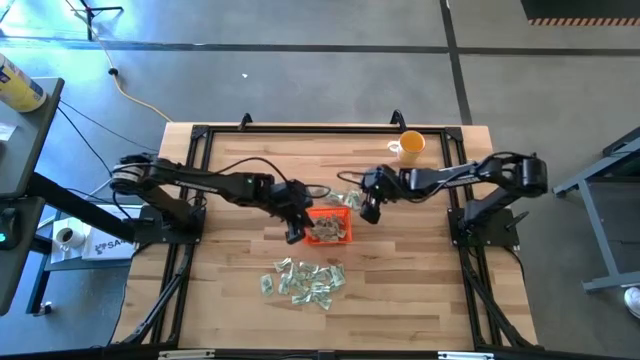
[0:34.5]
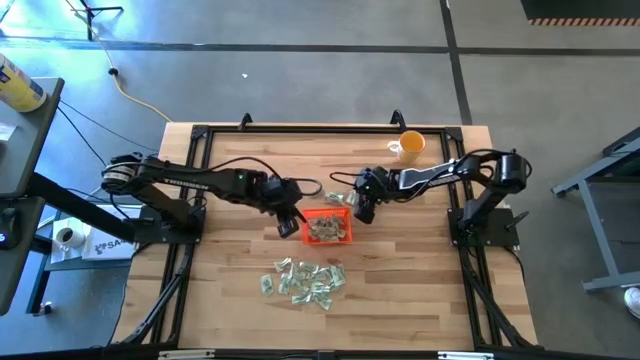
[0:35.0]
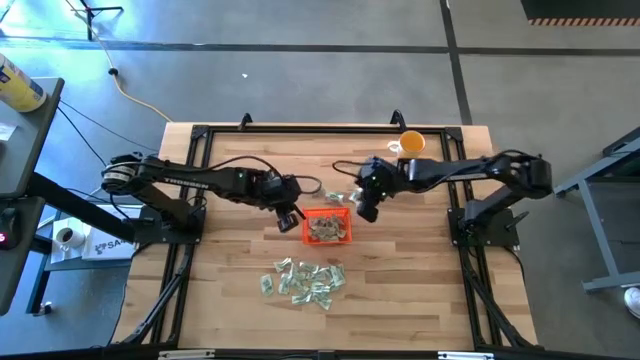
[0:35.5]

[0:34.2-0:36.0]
Task: Pick and place Stevia / Truvia into bins
Put the stevia packet into the orange bin

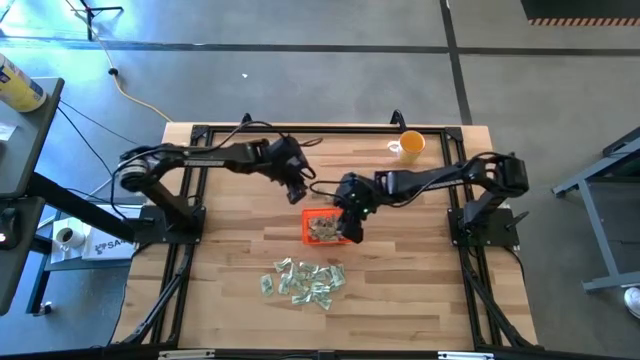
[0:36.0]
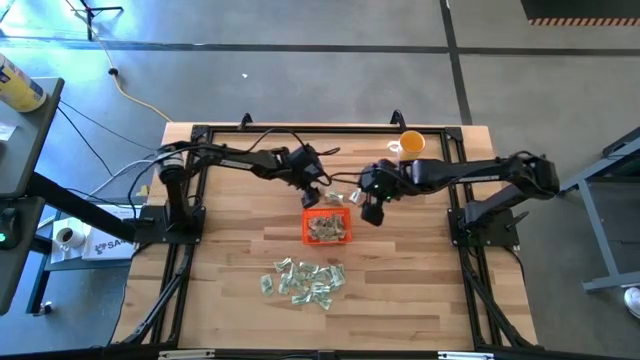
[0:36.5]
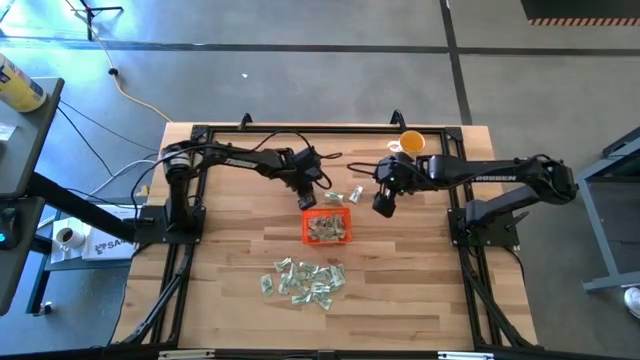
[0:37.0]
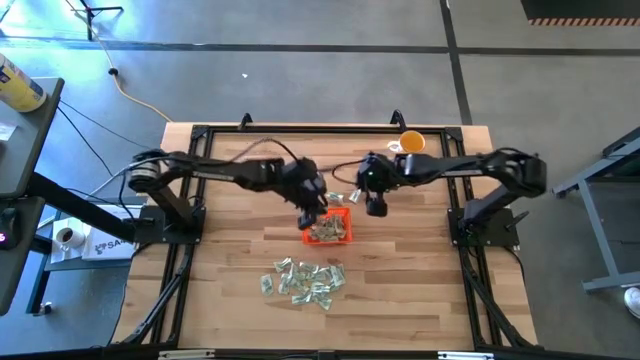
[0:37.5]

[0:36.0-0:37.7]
Put the stevia packet into the orange bin

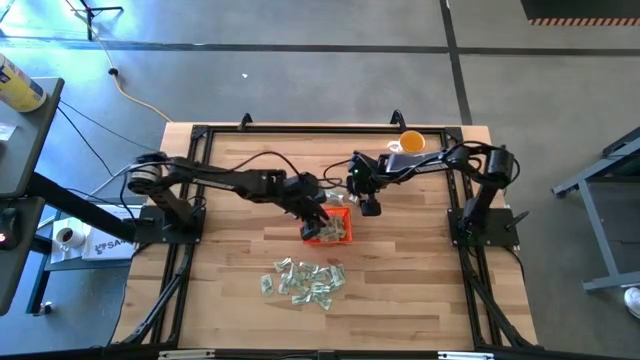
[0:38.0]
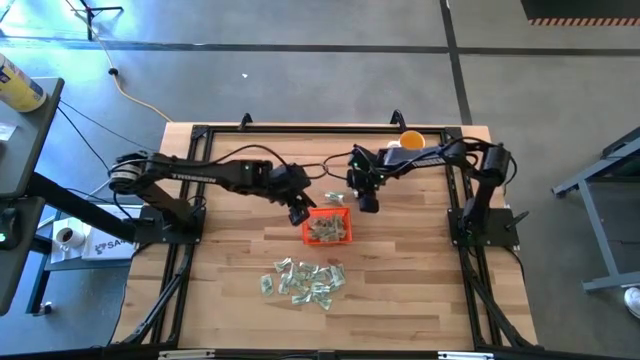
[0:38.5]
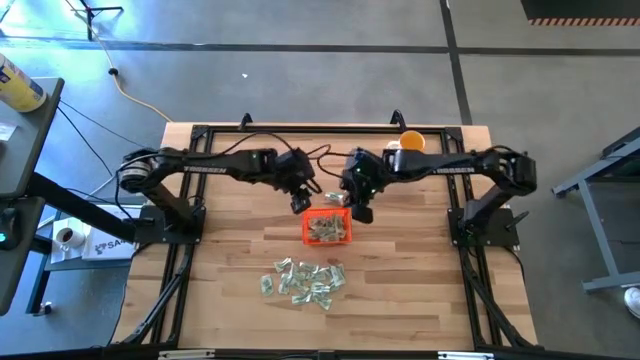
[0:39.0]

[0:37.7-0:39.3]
Put the stevia packet into the orange bin

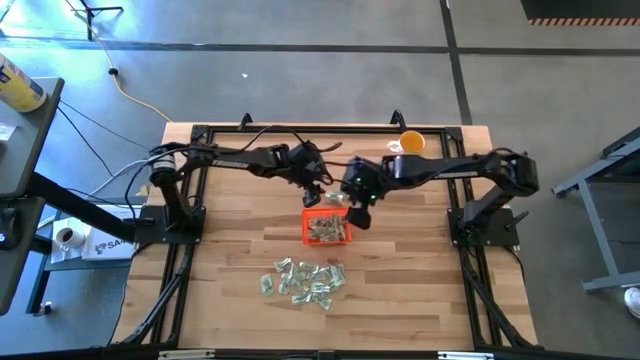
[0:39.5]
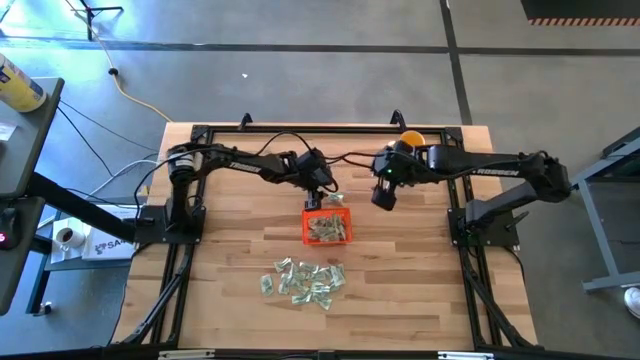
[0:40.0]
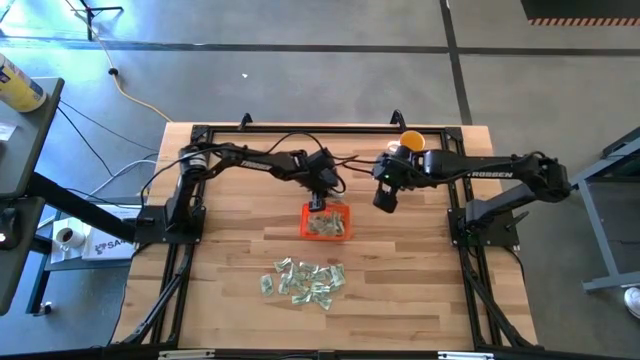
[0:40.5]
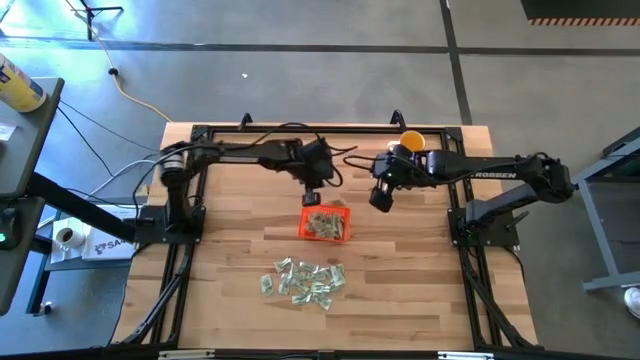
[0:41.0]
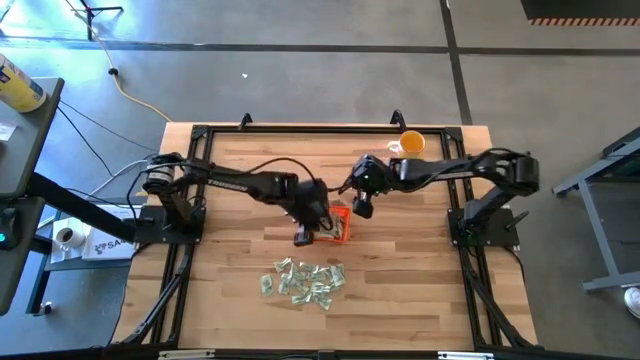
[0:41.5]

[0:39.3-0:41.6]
Put the stevia packet into the orange bin

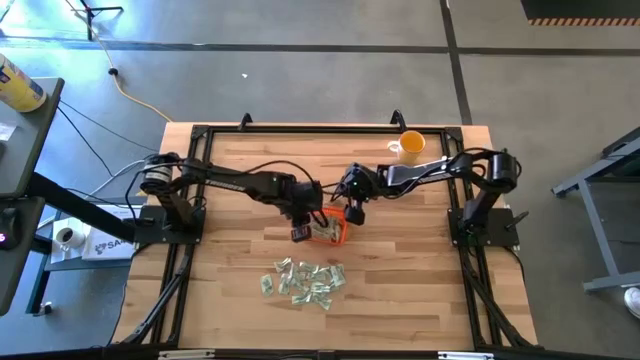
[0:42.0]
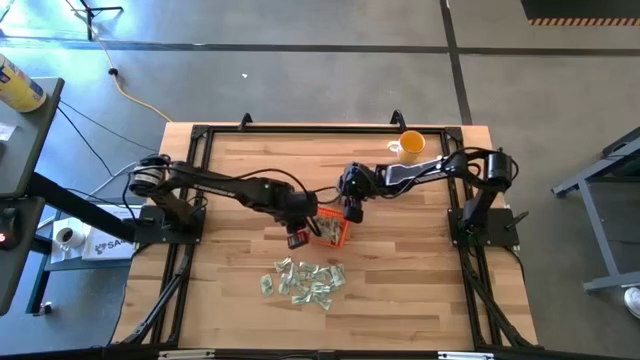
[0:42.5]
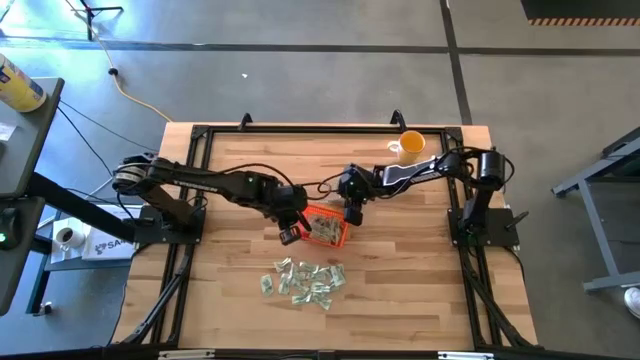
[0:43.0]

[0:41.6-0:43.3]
Put the stevia packet into the orange bin

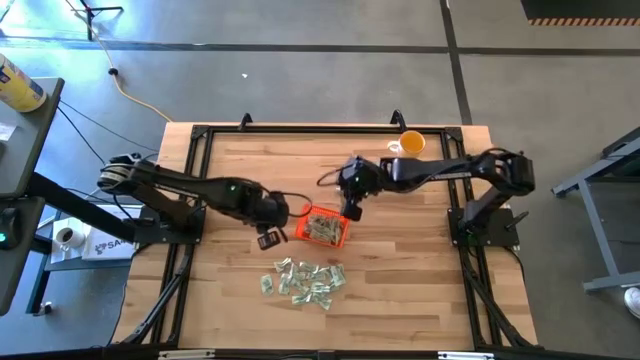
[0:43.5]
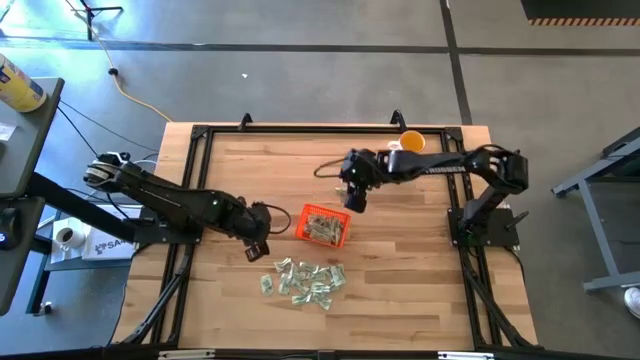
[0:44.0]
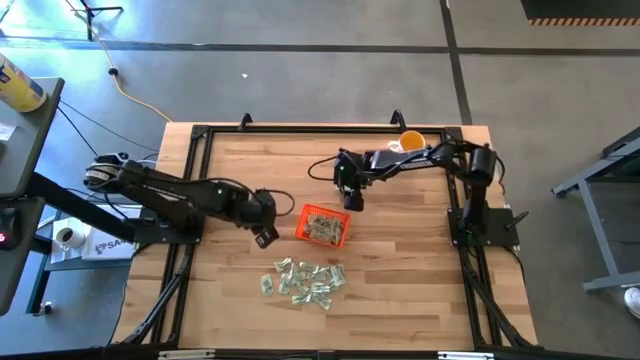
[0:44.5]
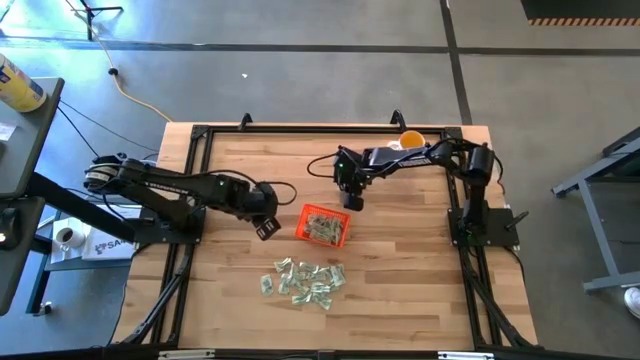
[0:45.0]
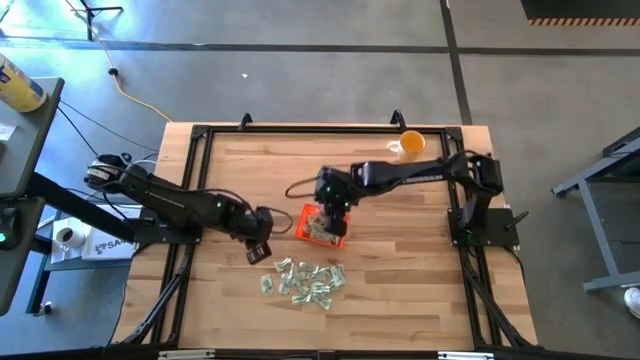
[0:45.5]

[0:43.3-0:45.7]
Put the stevia packet into the orange bin

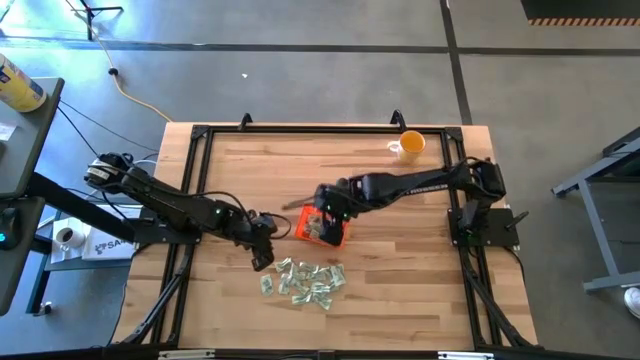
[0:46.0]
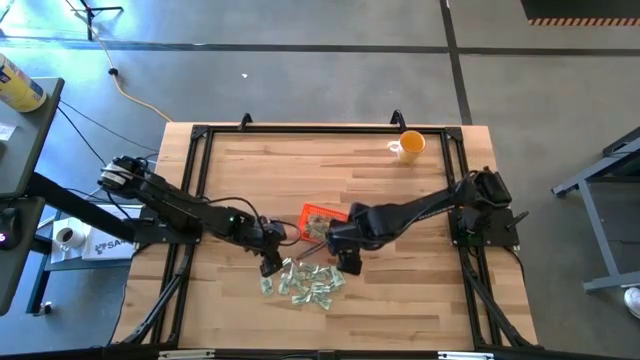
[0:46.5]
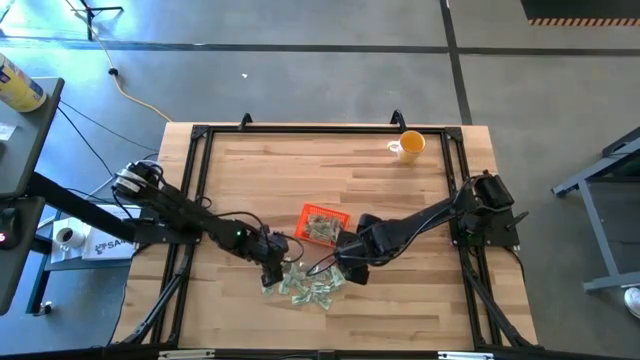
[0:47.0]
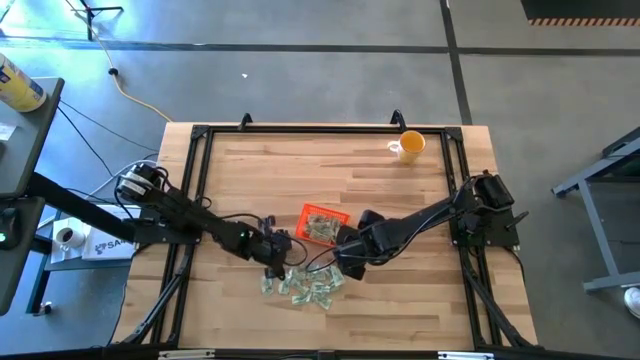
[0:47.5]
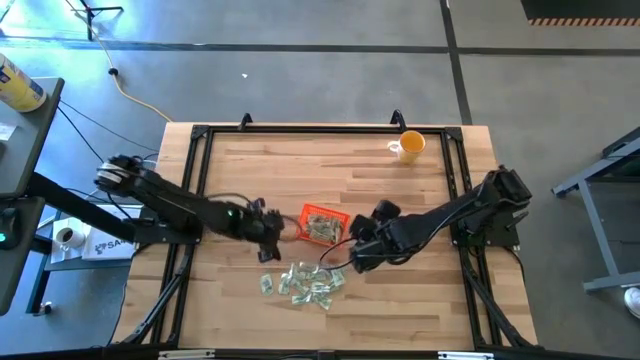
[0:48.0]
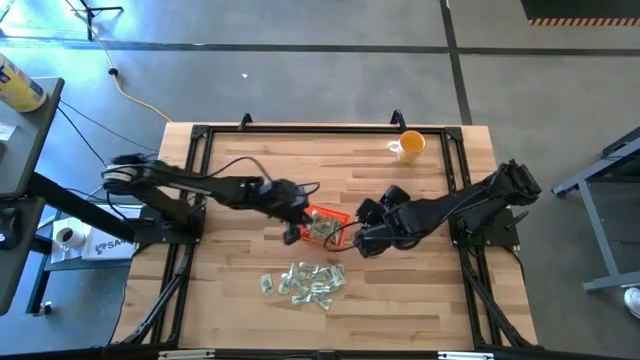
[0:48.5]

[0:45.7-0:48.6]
Put the stevia packet into the orange bin

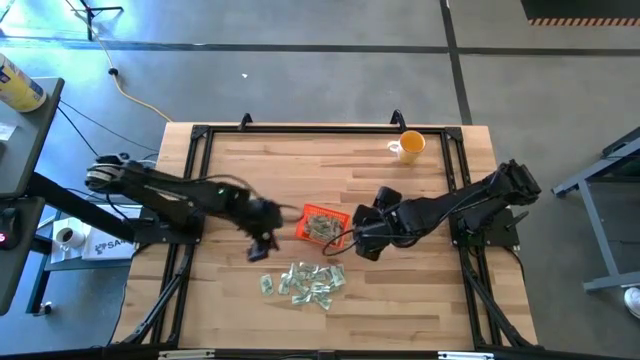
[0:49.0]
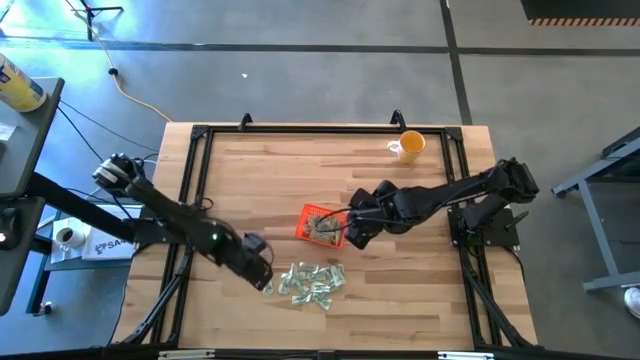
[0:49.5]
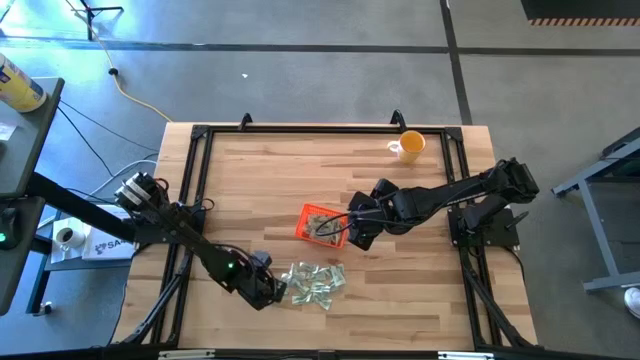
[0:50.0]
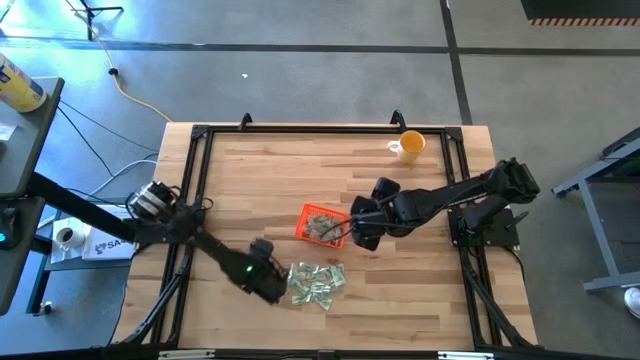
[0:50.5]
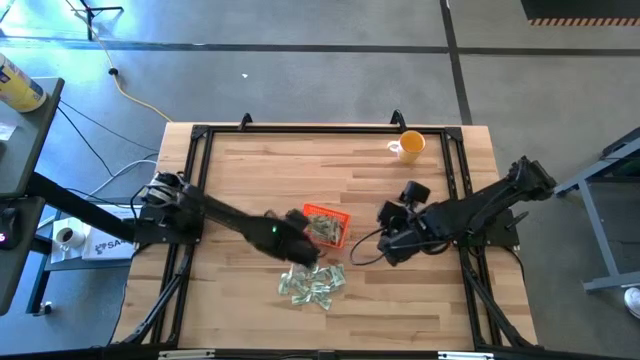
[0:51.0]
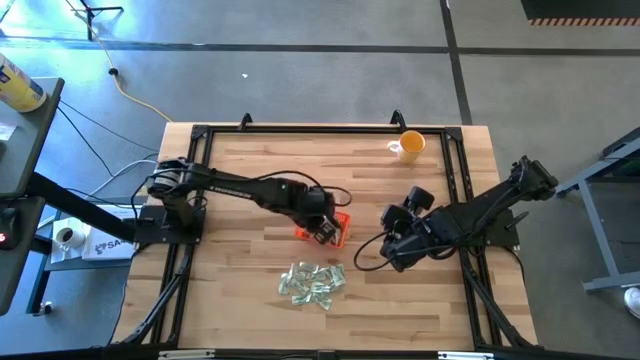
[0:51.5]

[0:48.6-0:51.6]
Put the stevia packet into the orange bin

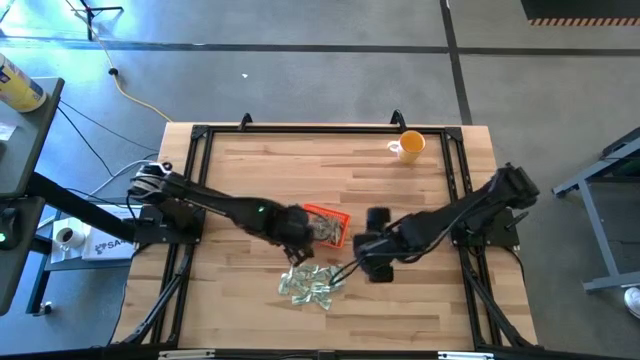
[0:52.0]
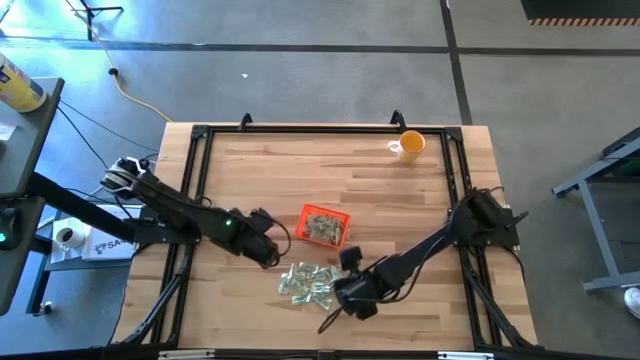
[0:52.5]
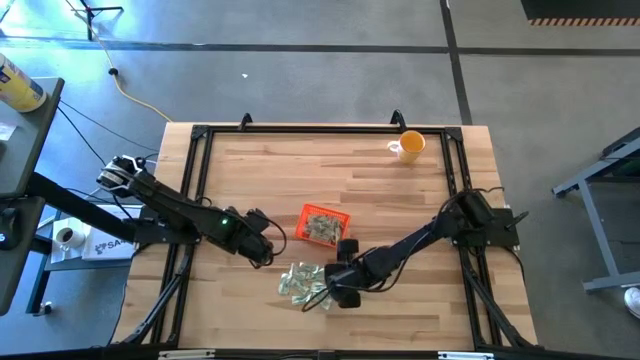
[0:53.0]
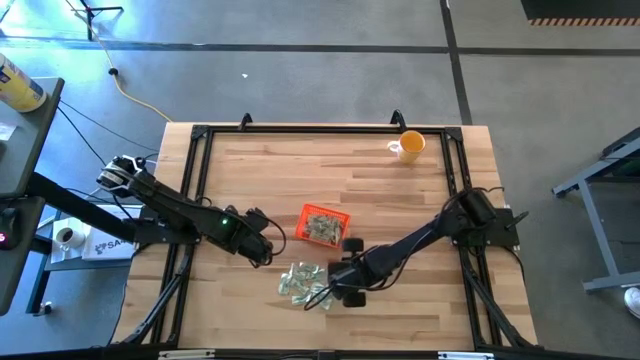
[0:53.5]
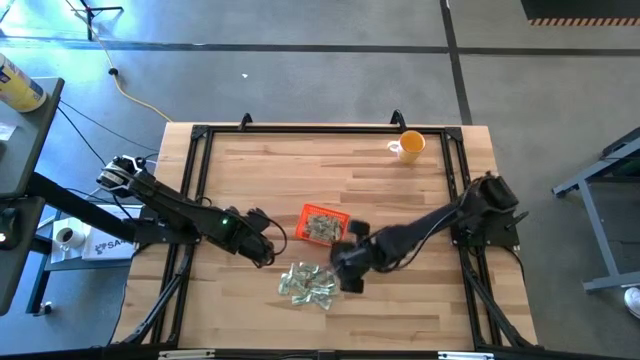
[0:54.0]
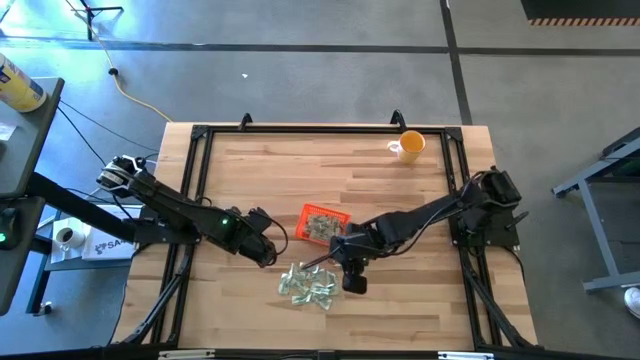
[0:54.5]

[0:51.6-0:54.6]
Put the stevia packet into the orange bin

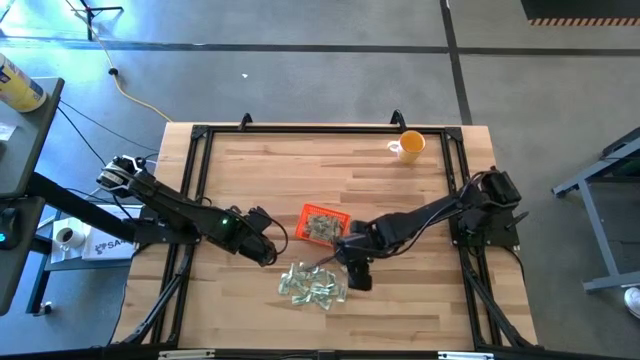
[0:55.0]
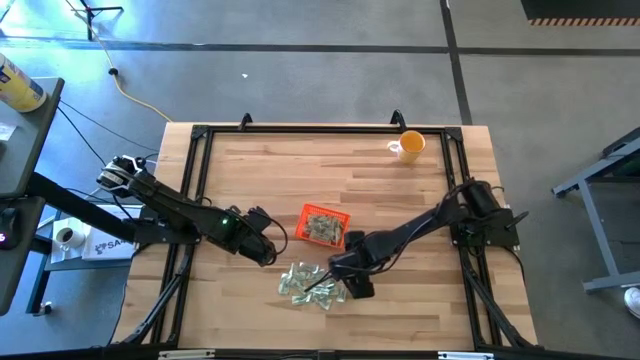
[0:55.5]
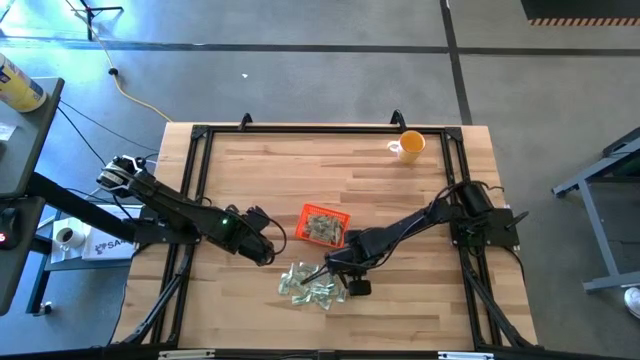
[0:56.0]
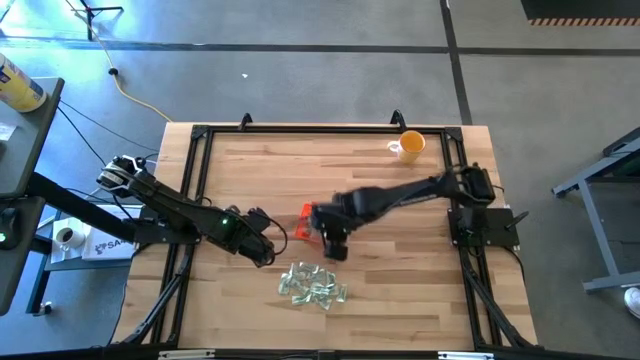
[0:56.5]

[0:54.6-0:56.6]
Put the stevia packet into the orange bin
